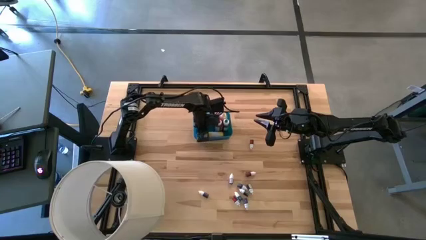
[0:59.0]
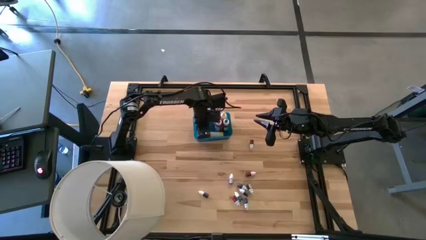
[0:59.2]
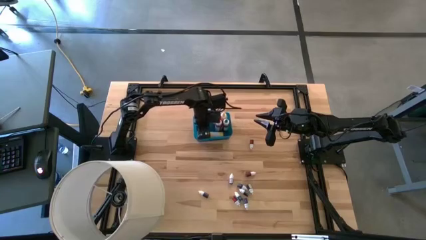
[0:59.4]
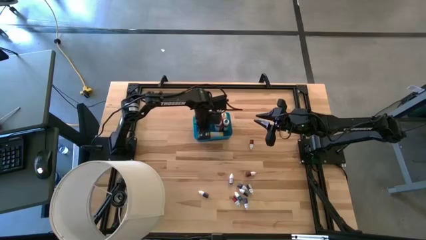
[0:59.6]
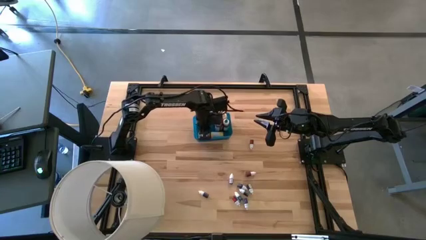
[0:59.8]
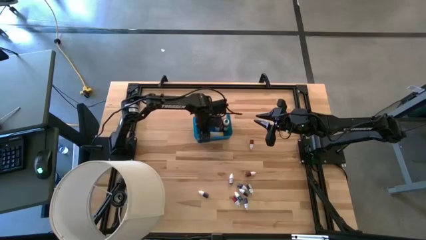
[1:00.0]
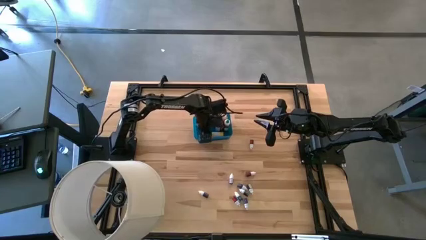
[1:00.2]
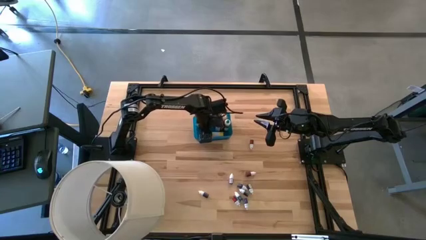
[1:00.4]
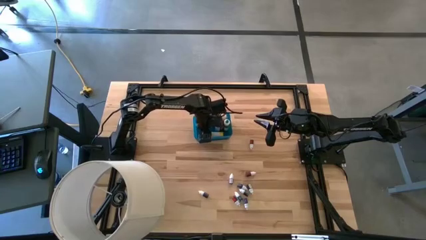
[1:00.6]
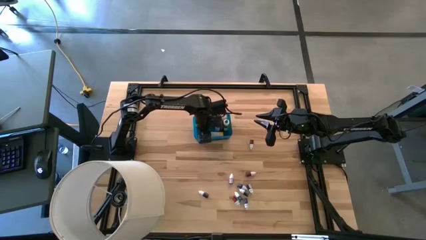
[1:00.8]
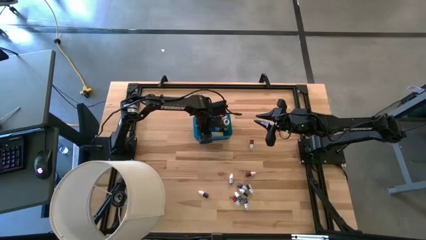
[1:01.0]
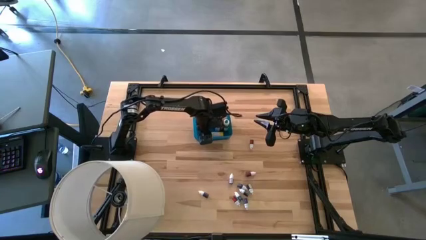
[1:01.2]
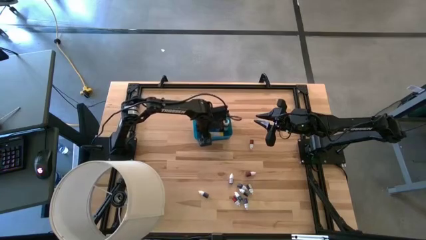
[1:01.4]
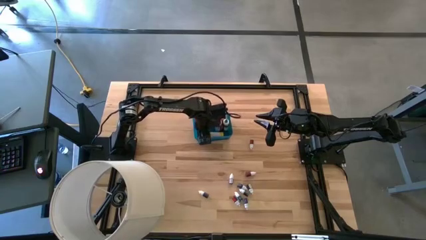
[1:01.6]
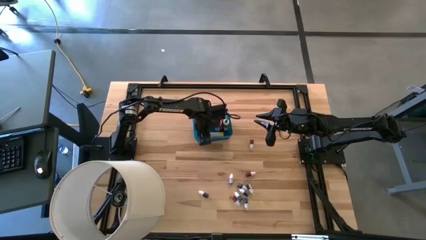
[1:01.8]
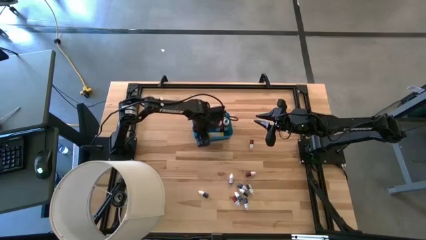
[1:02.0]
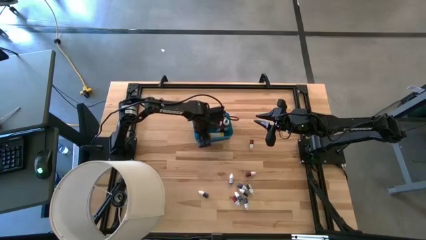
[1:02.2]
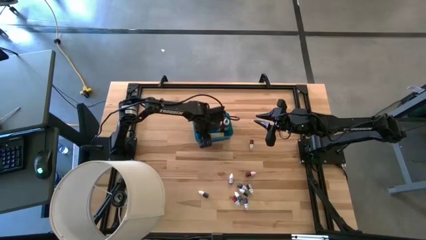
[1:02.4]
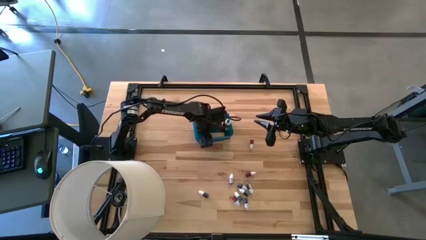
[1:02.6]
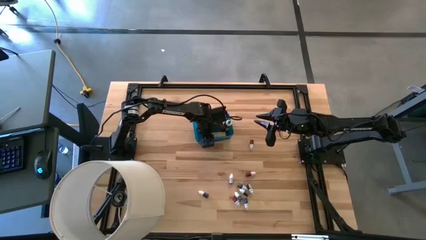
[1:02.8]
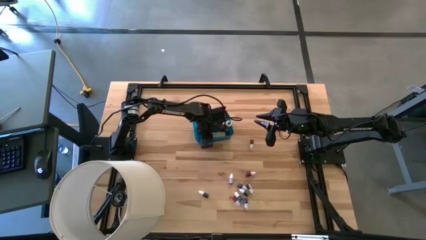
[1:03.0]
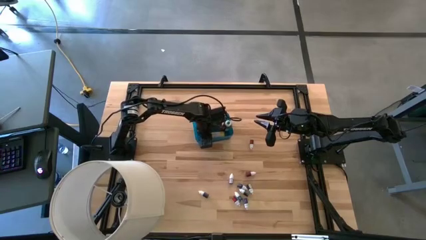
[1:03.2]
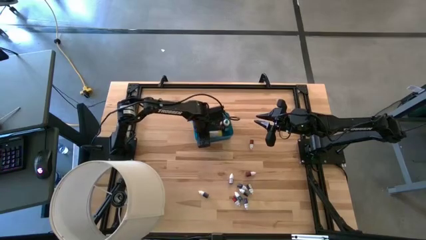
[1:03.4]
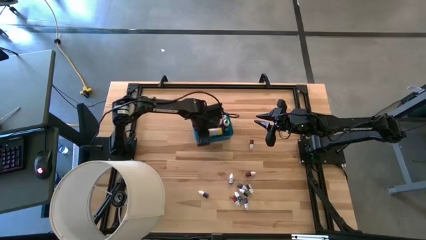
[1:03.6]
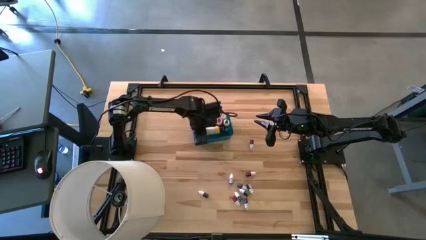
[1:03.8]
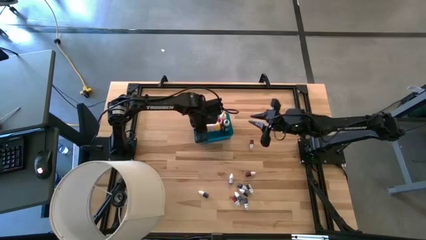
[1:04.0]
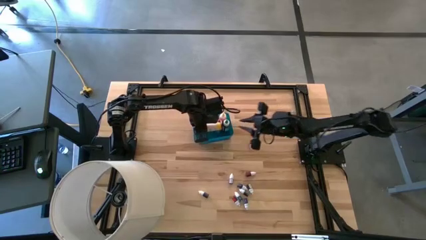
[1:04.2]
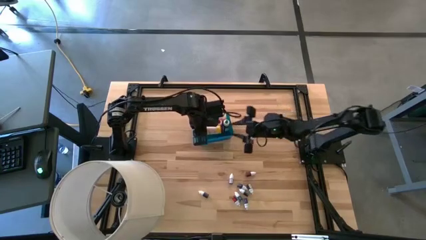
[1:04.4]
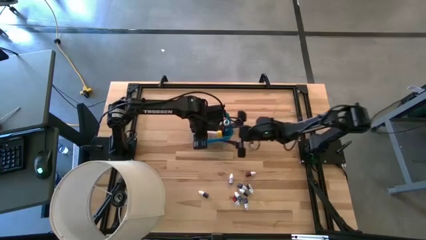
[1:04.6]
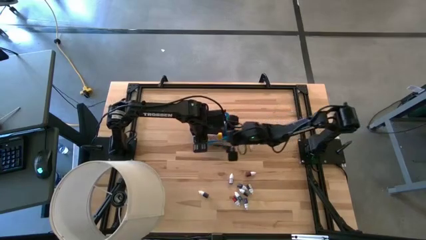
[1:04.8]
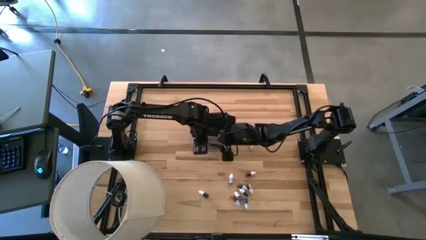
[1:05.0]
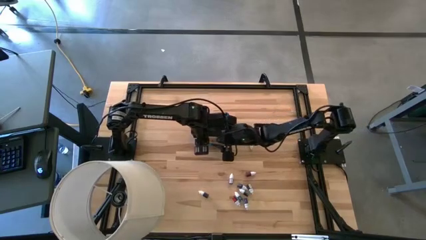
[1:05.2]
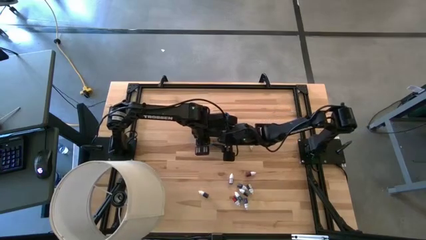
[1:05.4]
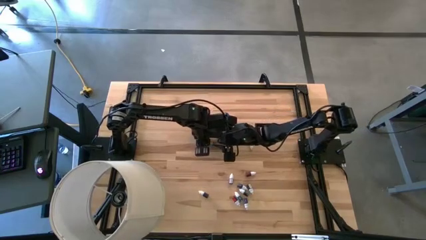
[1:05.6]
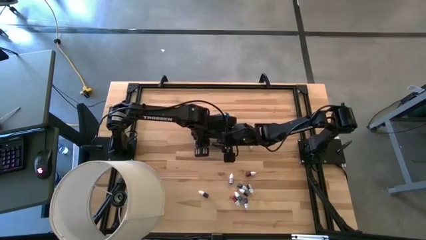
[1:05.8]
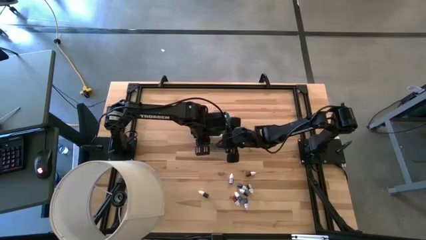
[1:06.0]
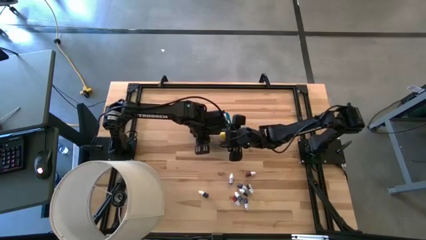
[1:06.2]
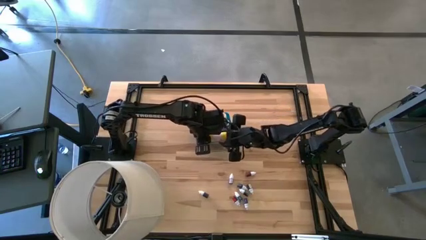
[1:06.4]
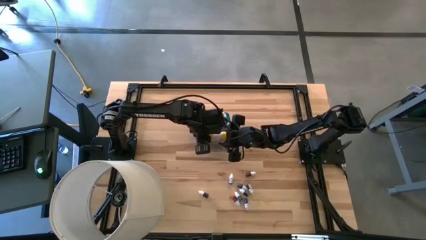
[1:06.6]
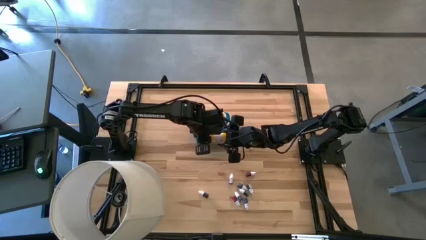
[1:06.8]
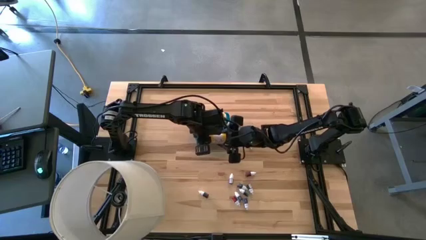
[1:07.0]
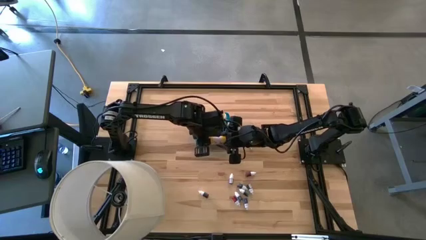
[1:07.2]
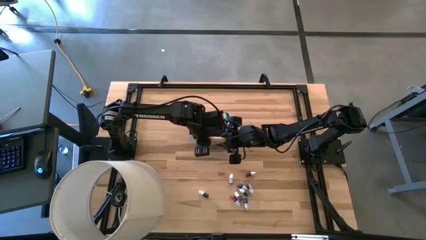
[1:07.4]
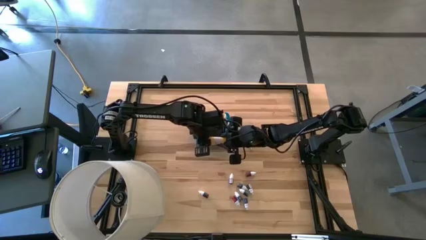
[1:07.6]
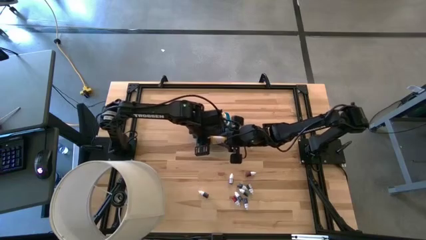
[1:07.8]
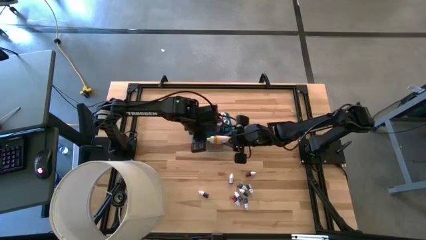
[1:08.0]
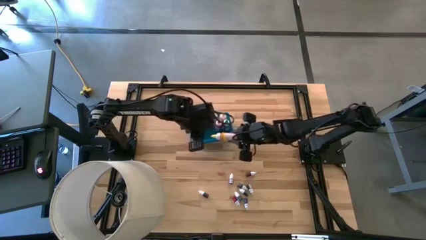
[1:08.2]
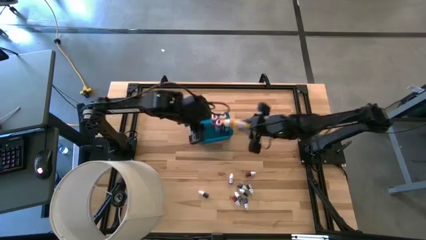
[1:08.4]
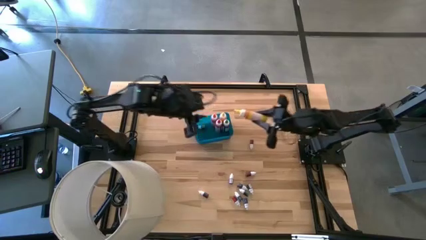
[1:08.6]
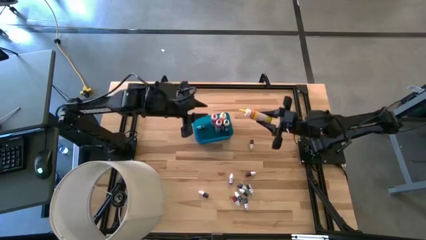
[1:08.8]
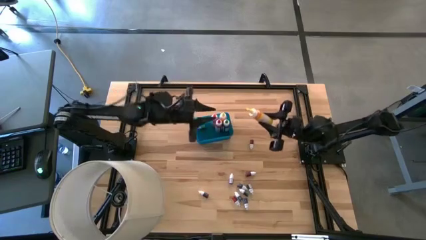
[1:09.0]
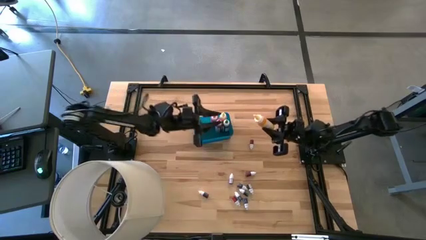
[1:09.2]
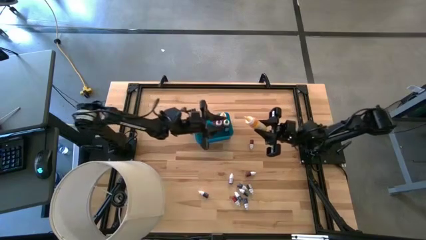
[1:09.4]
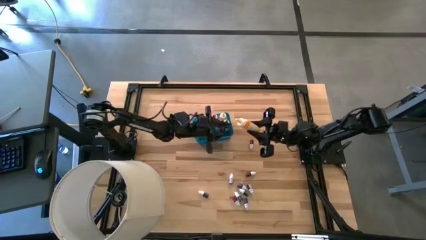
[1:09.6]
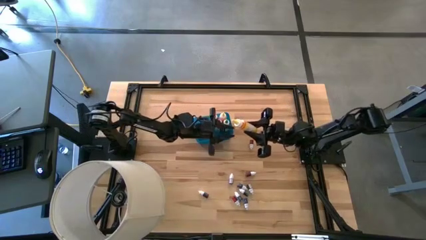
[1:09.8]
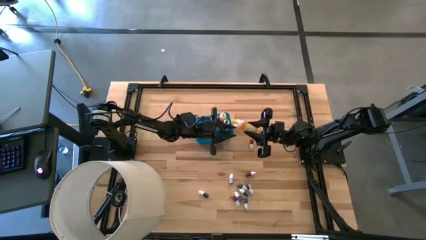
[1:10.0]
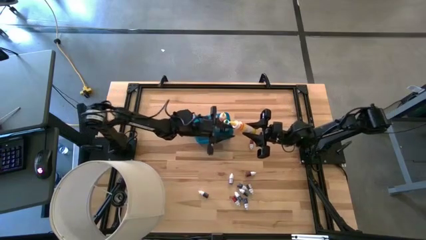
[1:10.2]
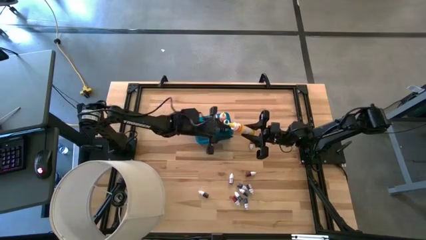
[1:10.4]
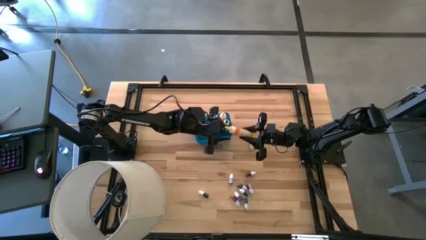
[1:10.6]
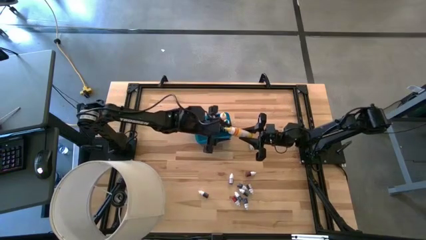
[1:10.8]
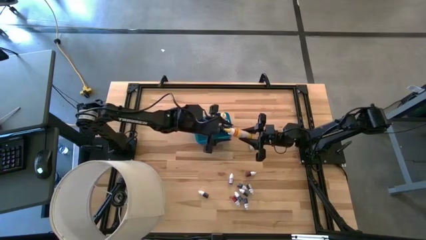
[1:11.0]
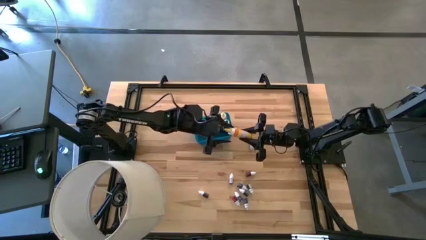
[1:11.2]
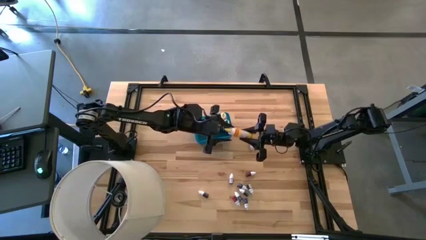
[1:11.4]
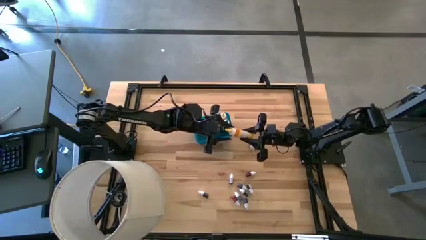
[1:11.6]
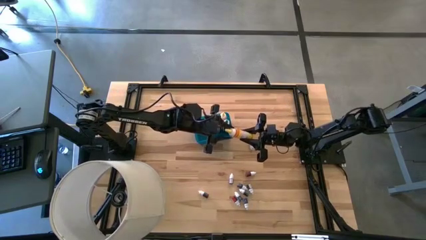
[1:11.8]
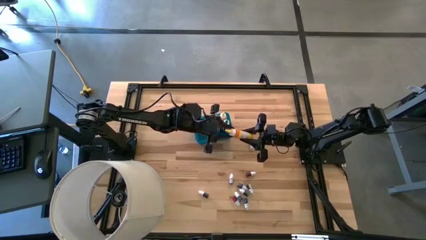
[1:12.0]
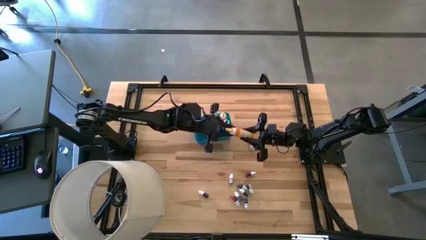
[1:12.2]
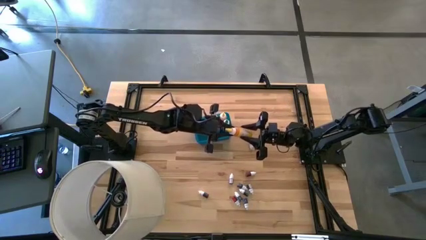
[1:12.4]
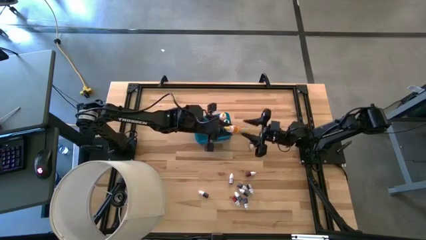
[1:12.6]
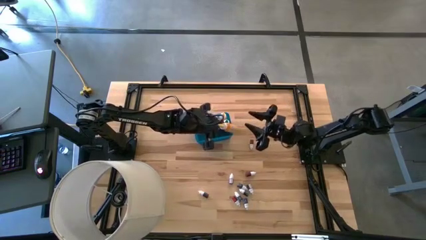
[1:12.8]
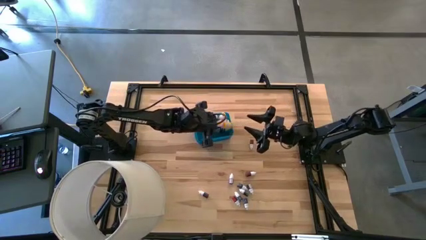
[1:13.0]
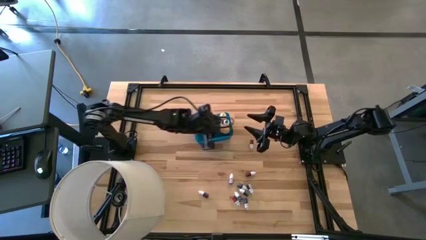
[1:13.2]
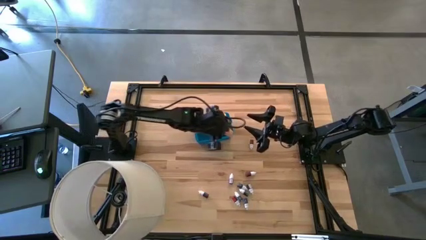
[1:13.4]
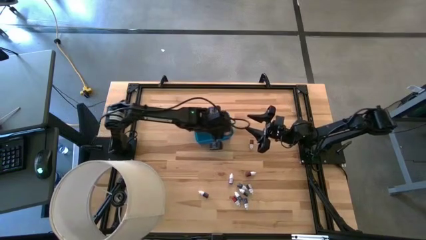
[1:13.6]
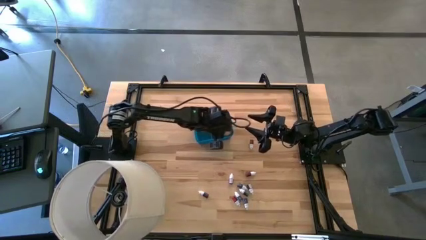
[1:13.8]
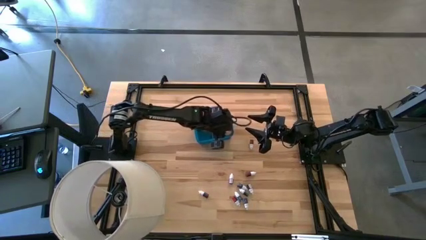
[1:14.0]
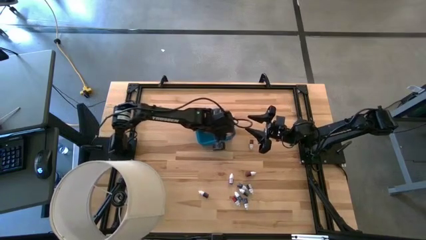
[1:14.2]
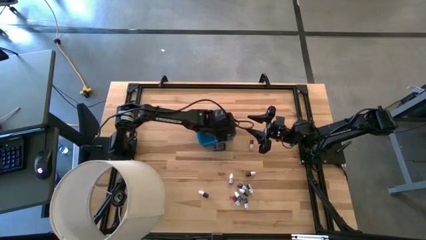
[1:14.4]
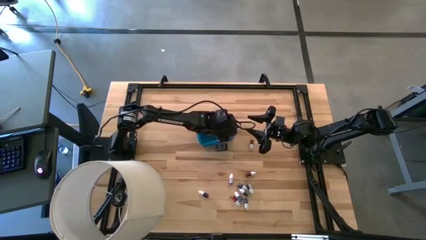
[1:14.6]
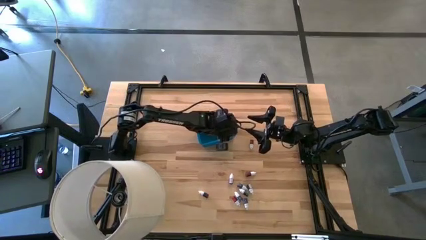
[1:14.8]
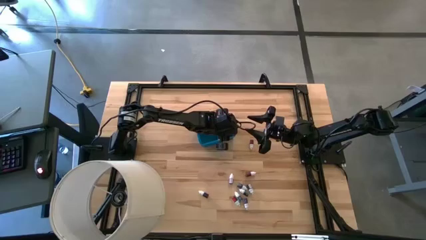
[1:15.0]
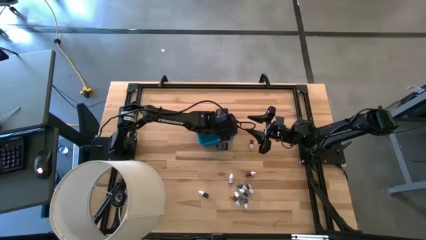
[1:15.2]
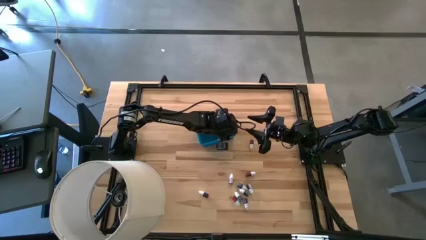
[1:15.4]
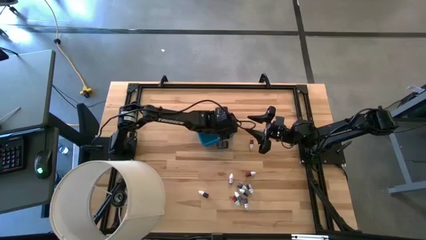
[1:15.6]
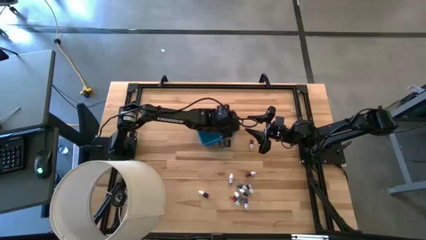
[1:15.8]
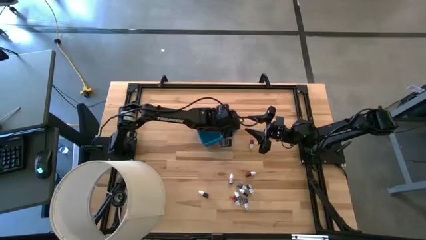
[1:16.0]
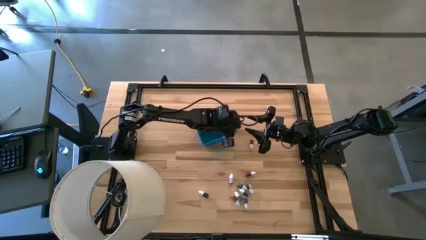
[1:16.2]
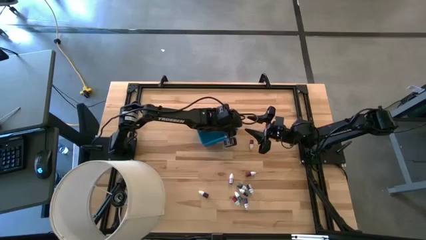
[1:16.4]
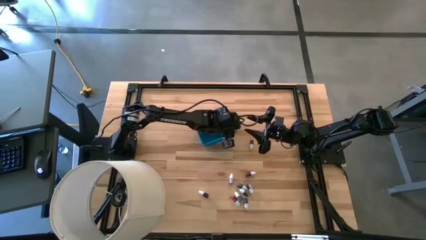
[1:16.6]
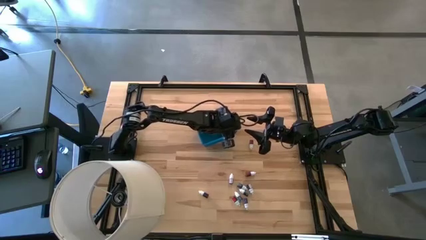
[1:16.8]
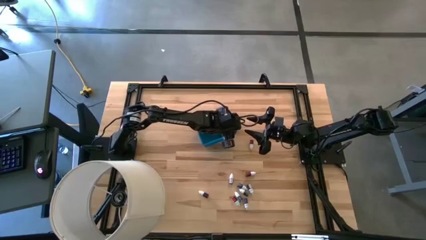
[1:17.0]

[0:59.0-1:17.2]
Task: Pick & Place food coloring
Adjust the big yellow food coloring bottle in the bin
